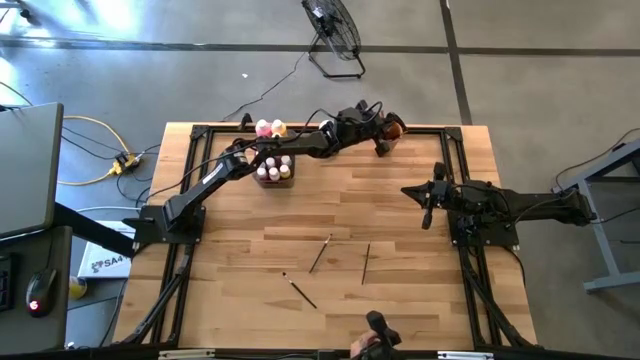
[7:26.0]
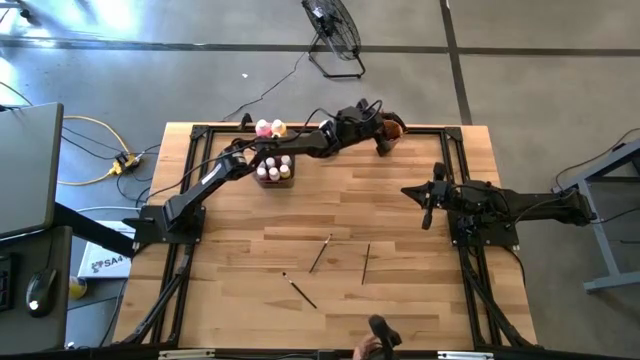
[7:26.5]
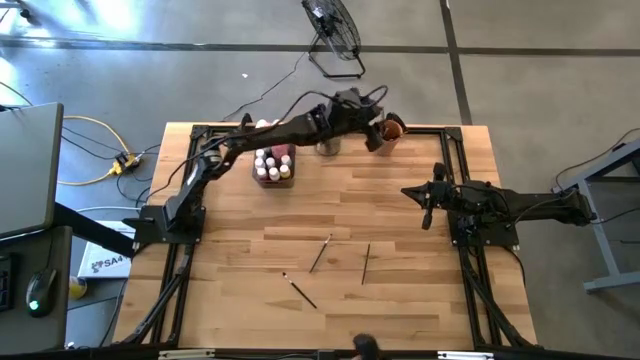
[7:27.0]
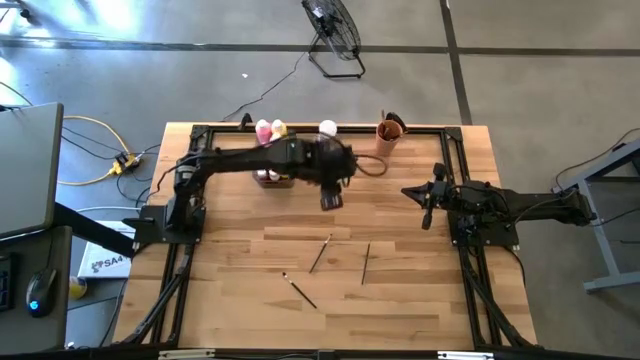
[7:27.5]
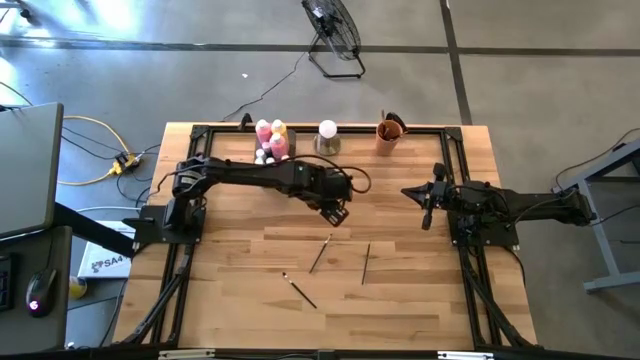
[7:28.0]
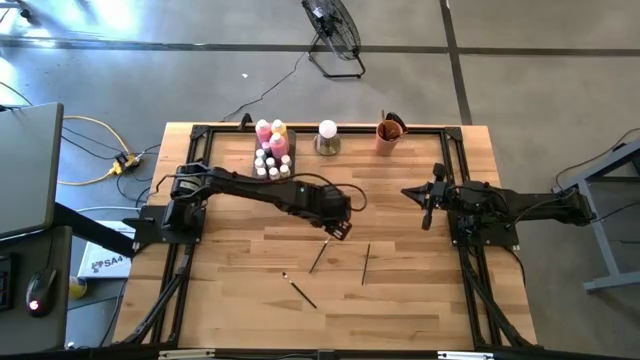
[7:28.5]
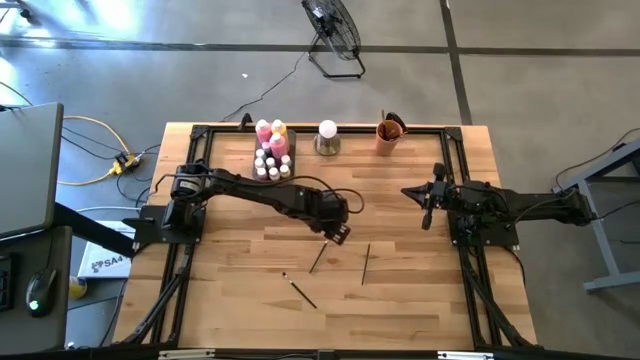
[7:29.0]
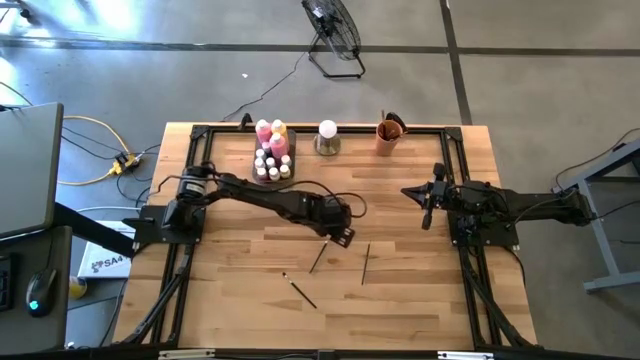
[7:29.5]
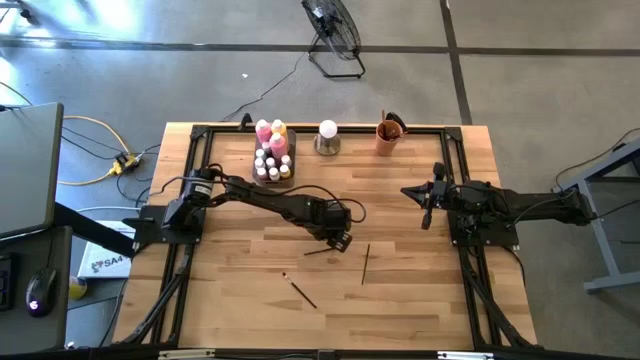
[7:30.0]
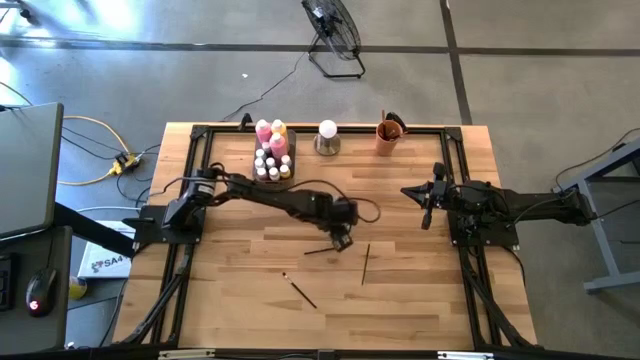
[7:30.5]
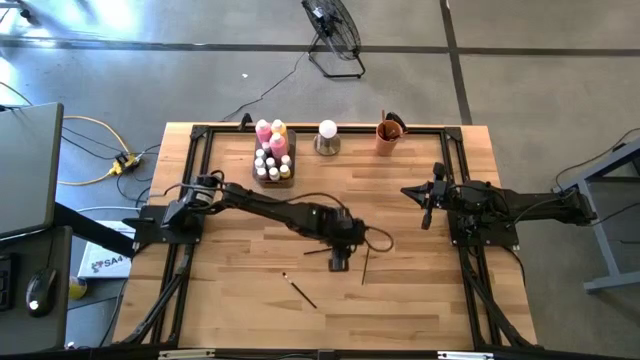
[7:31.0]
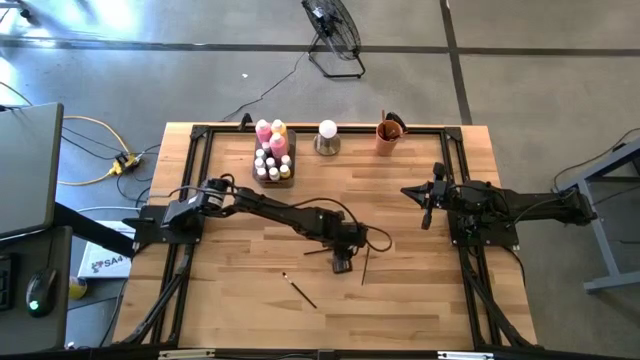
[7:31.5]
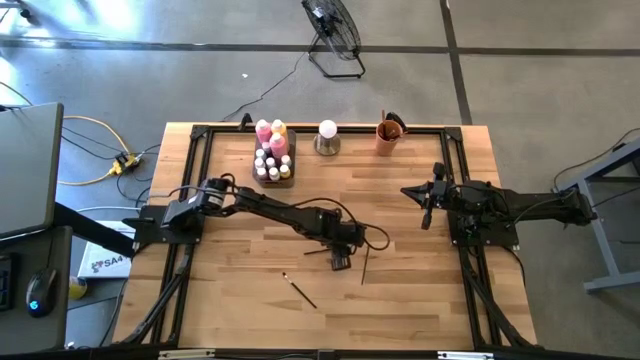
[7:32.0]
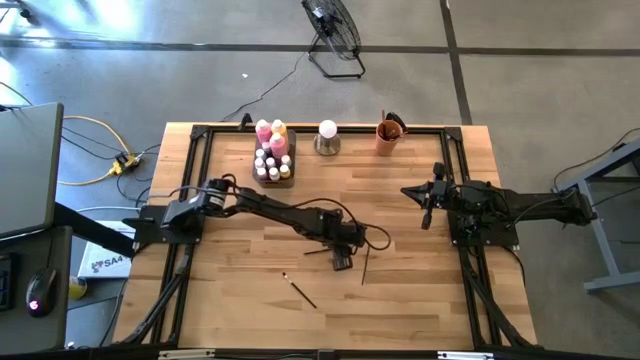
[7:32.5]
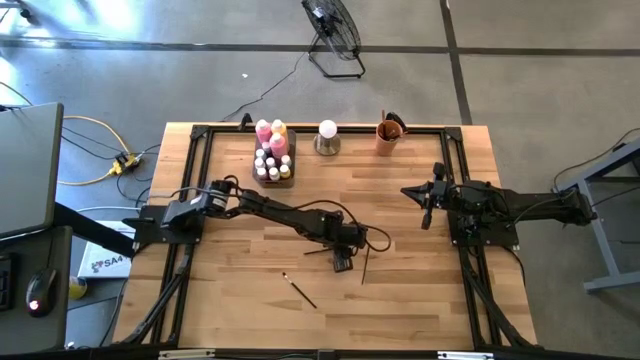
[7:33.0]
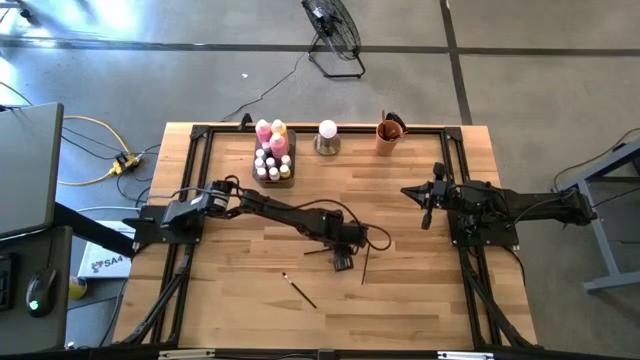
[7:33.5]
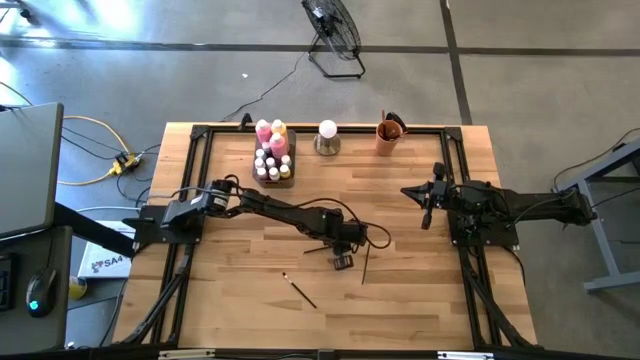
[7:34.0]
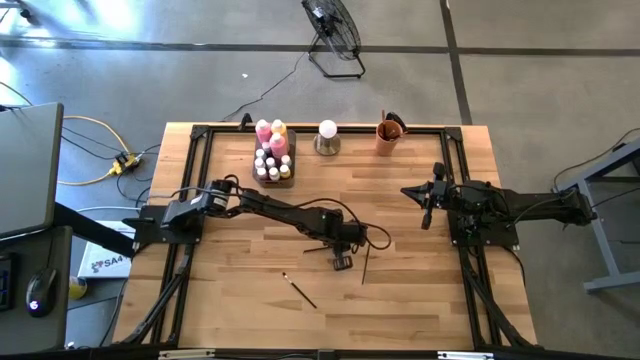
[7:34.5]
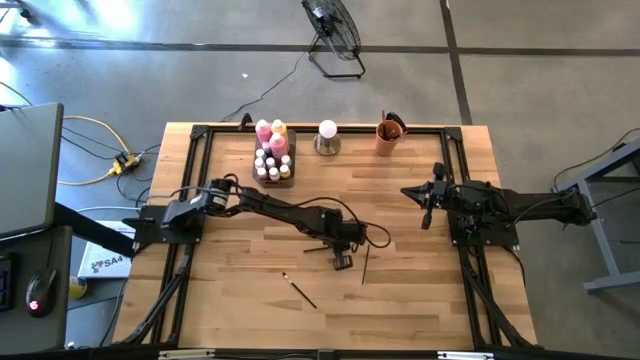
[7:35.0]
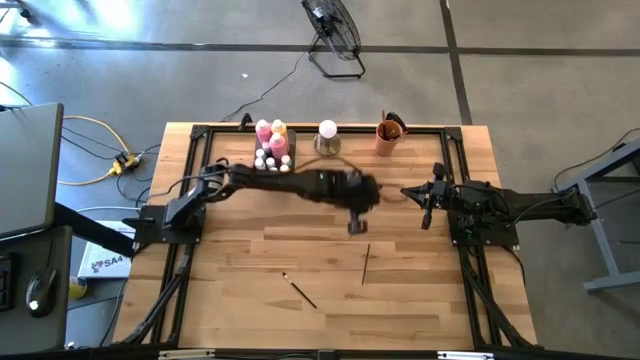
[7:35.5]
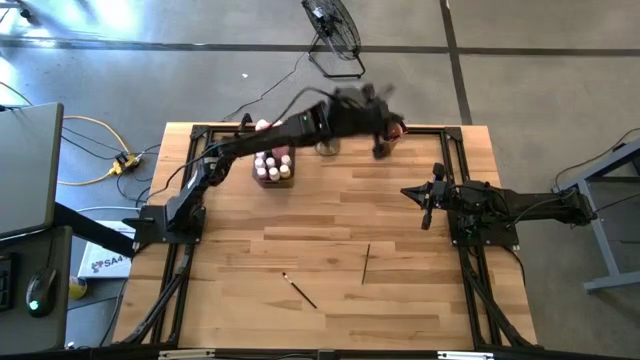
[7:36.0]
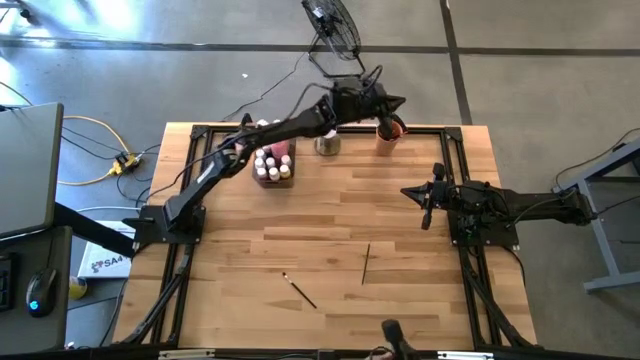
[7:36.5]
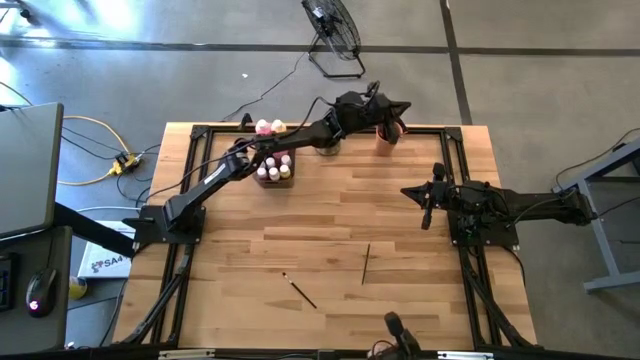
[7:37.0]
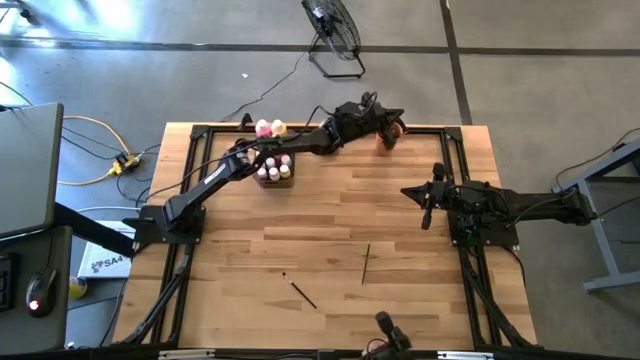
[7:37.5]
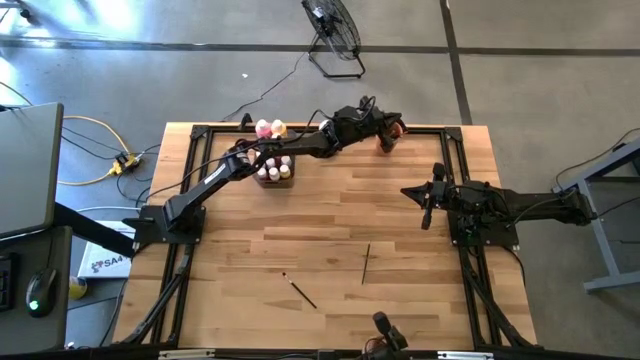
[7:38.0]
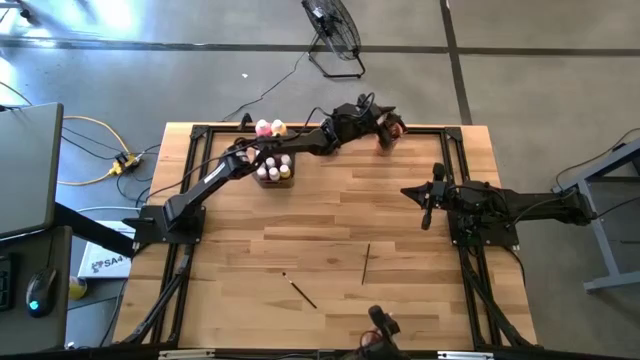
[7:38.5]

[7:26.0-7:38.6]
Task: Pick & Place Paint Supplies
Put the silver paintbrush into the orange cup

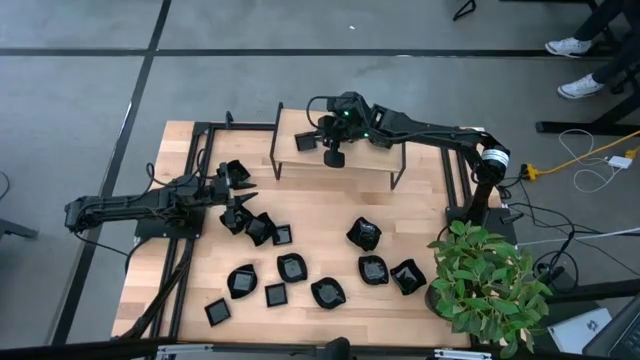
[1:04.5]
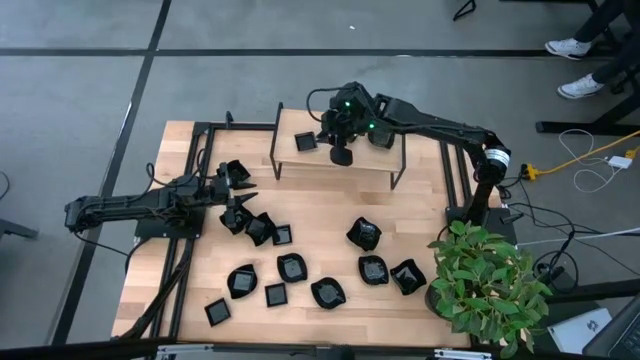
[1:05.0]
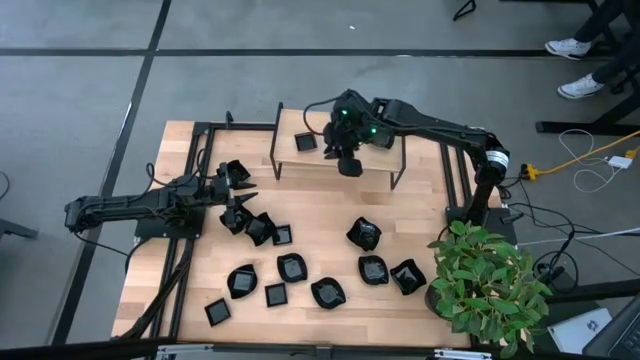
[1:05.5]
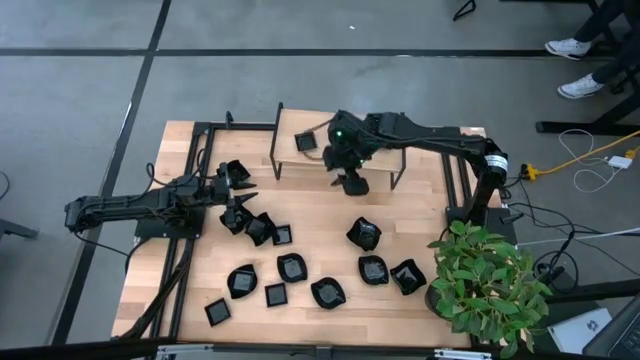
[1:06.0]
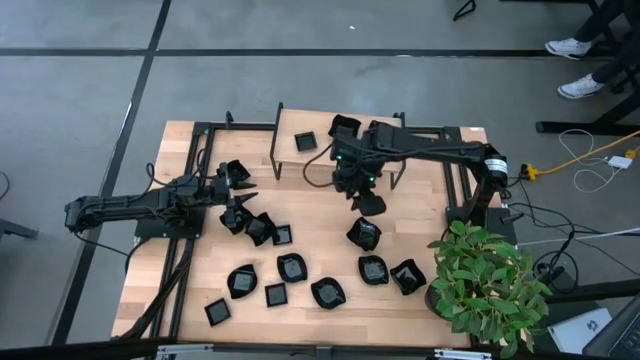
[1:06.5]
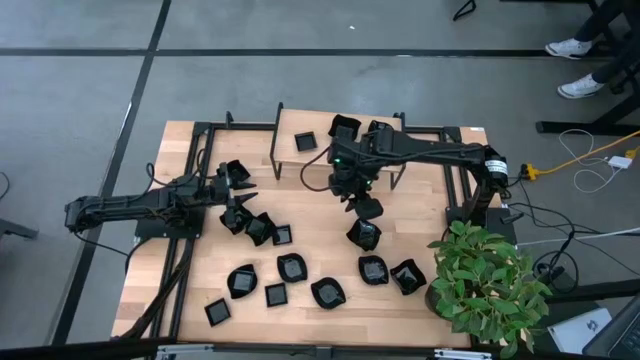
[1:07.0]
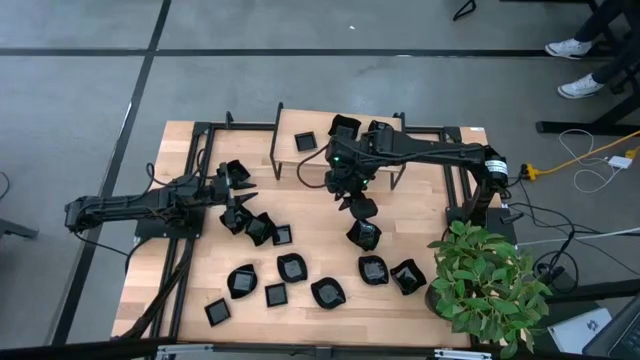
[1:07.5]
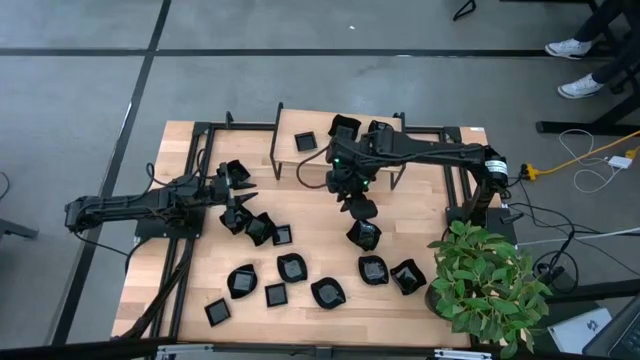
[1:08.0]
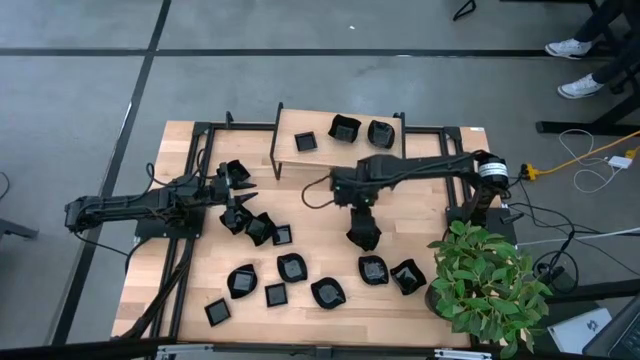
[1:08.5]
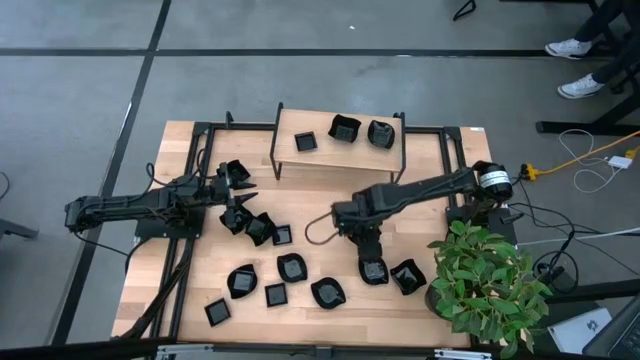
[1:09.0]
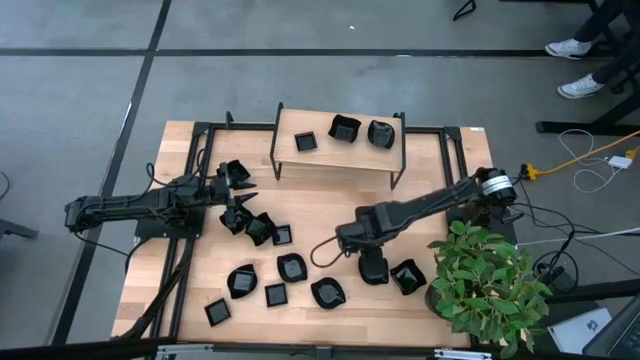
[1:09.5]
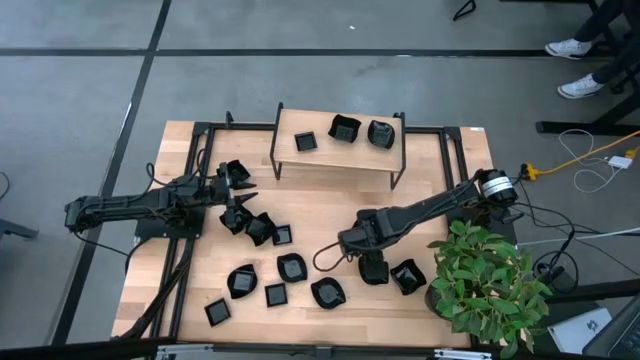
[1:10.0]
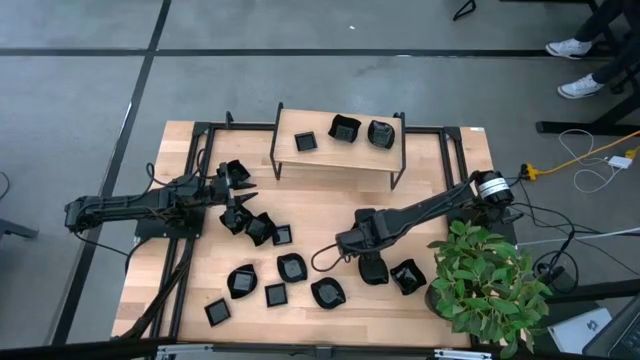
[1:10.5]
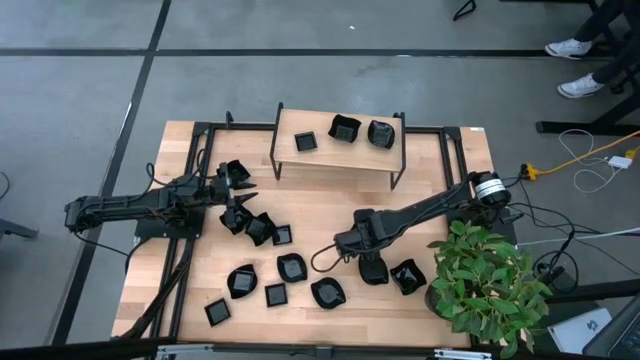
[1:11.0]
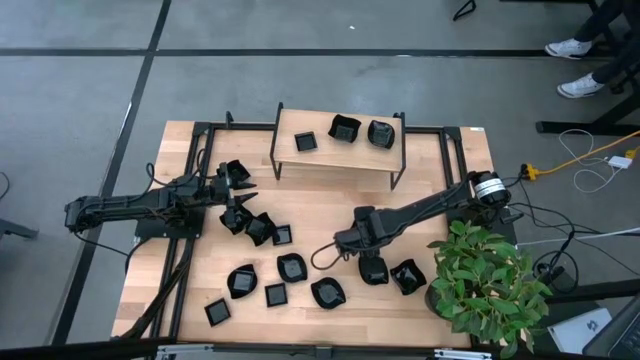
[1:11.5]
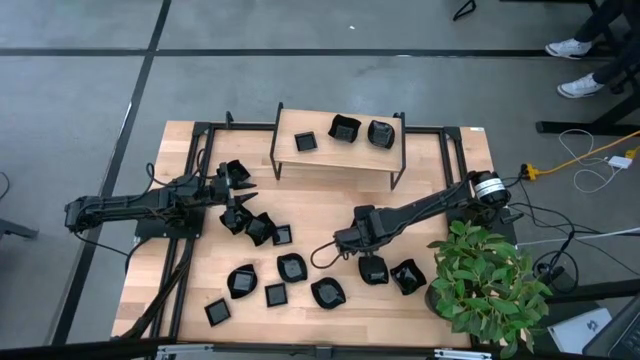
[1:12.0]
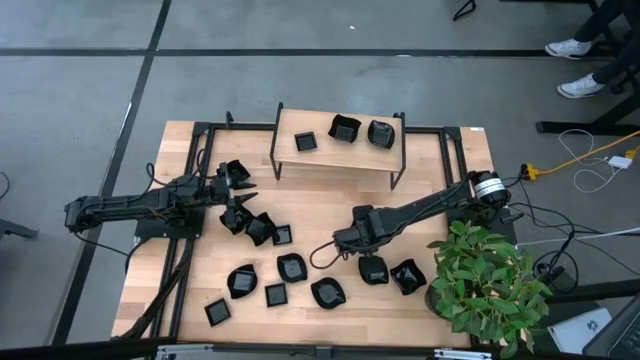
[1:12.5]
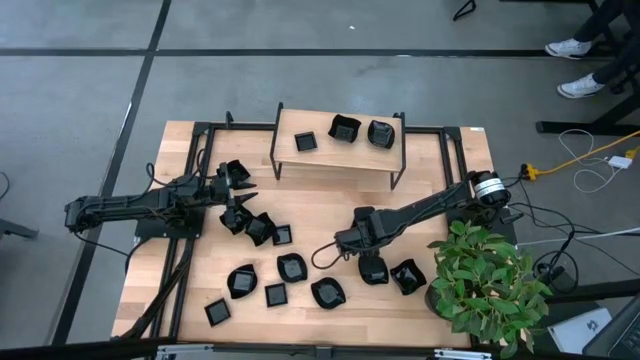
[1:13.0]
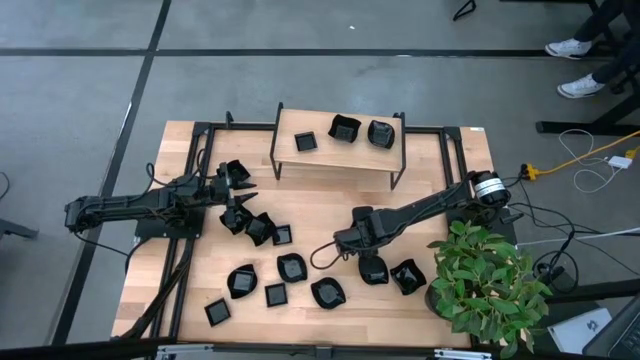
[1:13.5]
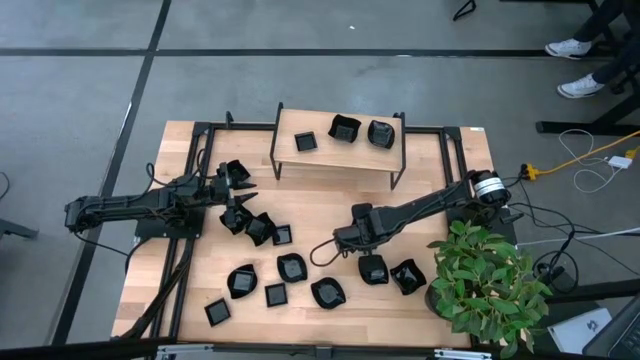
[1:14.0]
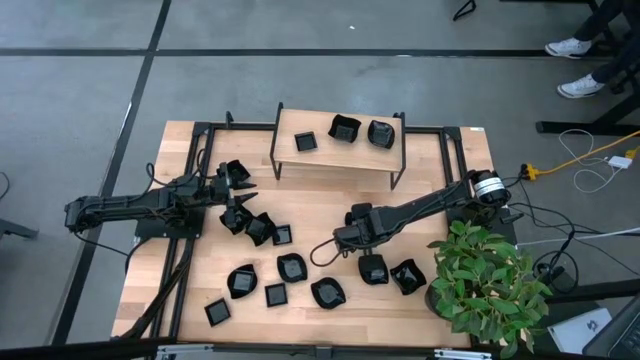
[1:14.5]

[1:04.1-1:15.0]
Task: Pick & Place Mini shaped plates
Stack the leaf-shaped plate on top of the leaf-shaped plate on the shelf
